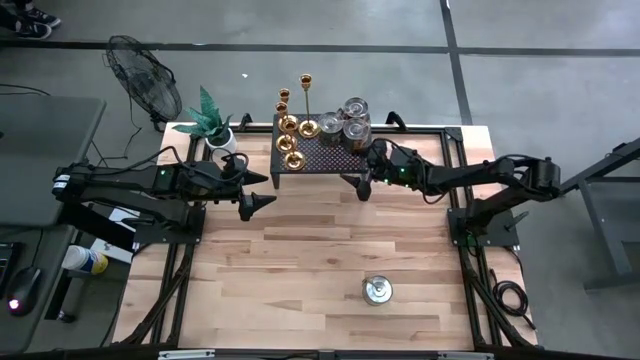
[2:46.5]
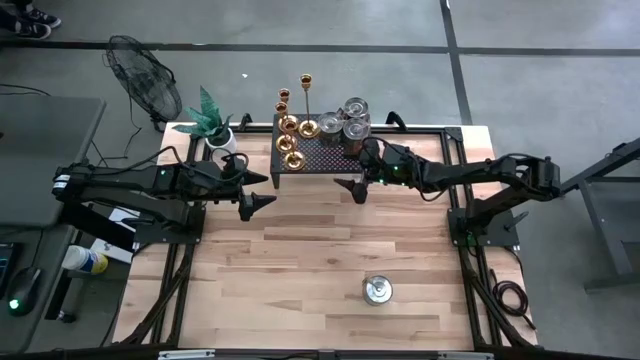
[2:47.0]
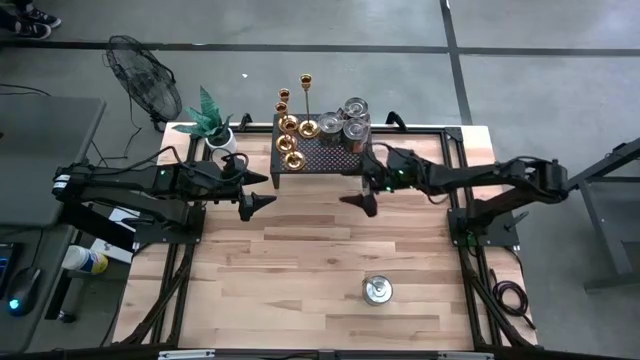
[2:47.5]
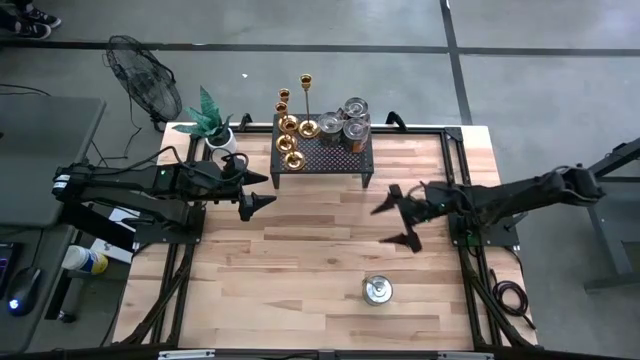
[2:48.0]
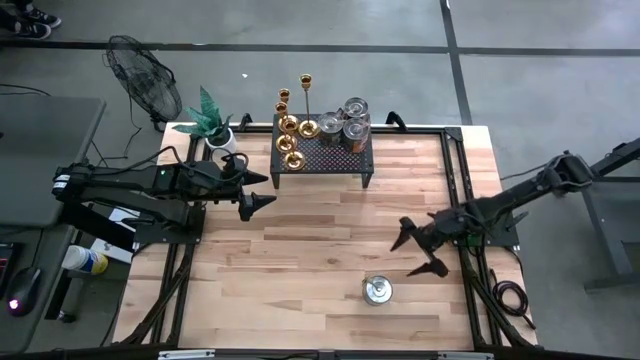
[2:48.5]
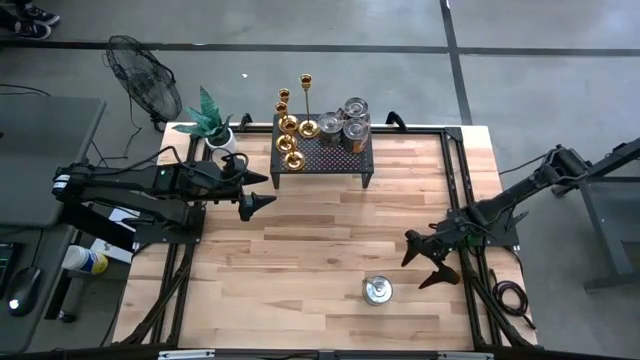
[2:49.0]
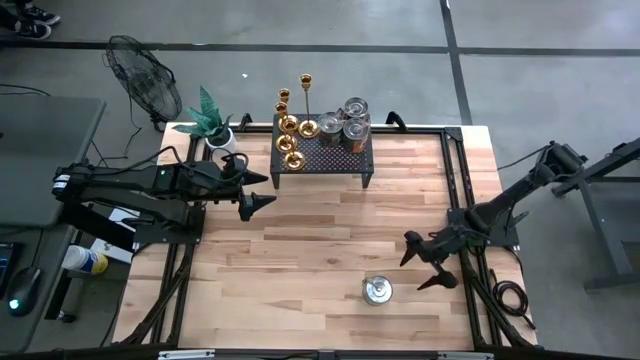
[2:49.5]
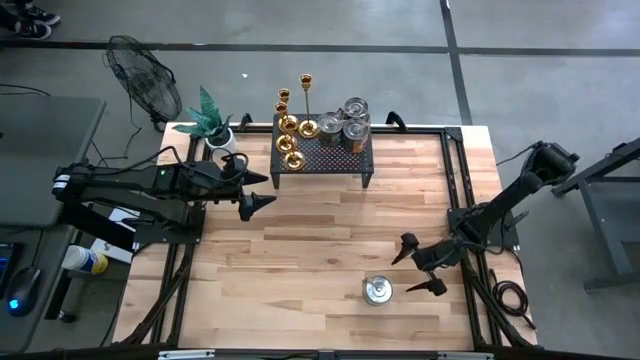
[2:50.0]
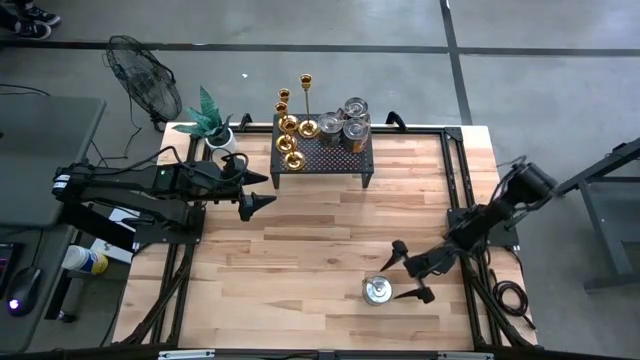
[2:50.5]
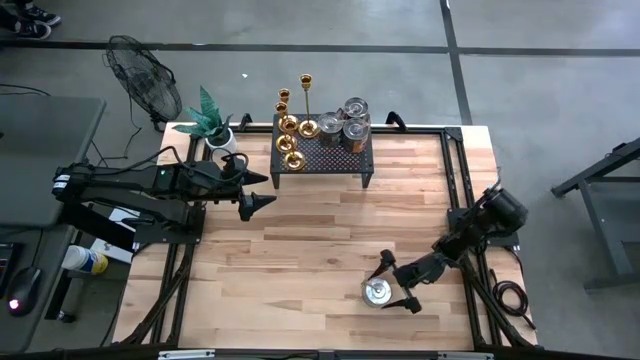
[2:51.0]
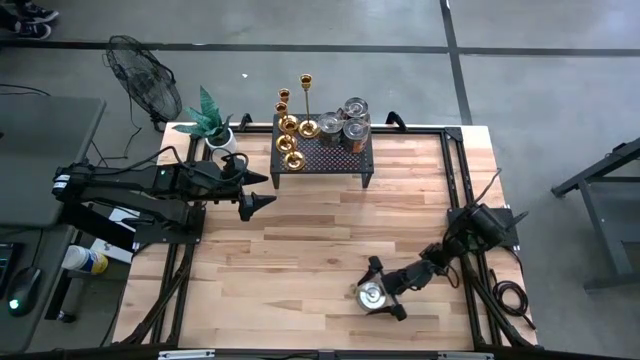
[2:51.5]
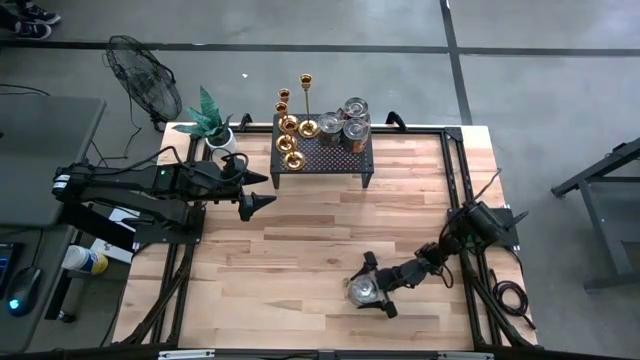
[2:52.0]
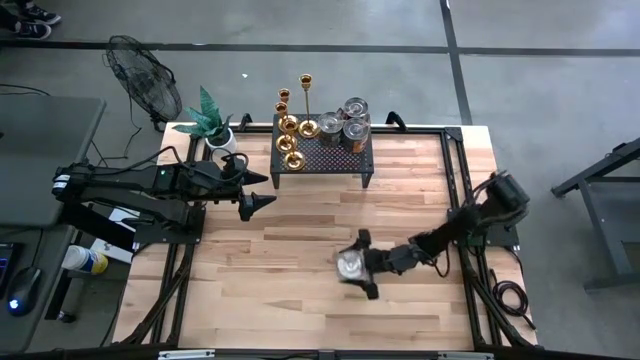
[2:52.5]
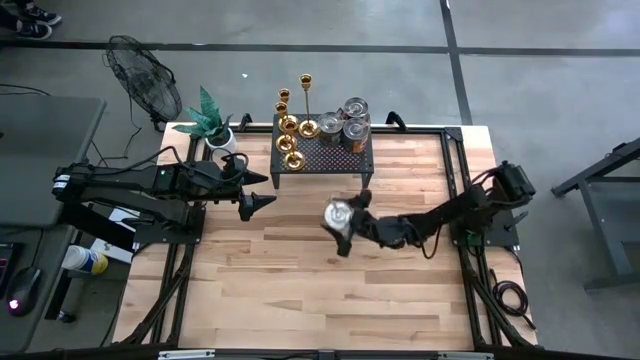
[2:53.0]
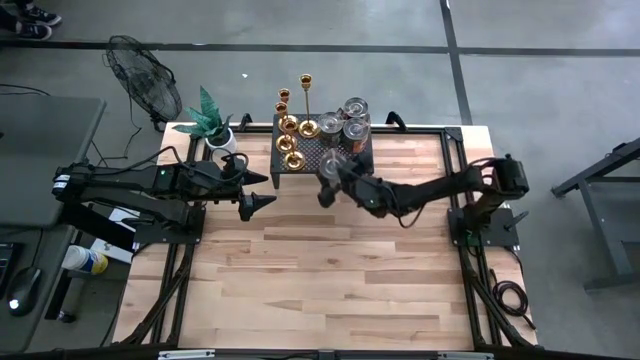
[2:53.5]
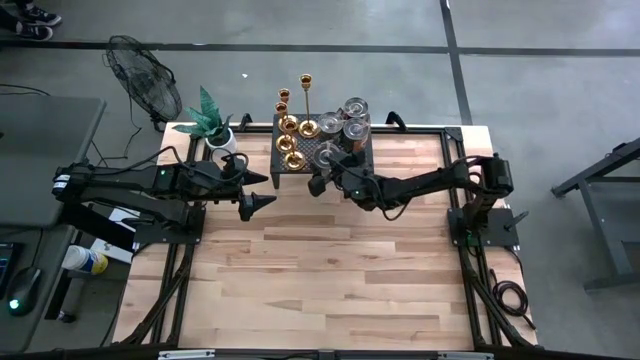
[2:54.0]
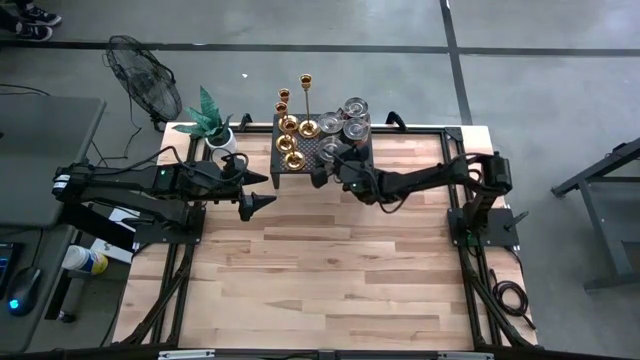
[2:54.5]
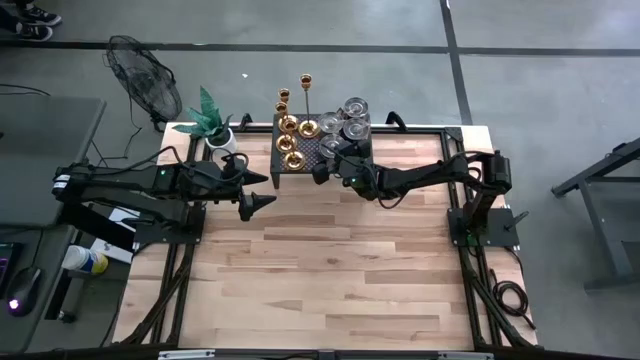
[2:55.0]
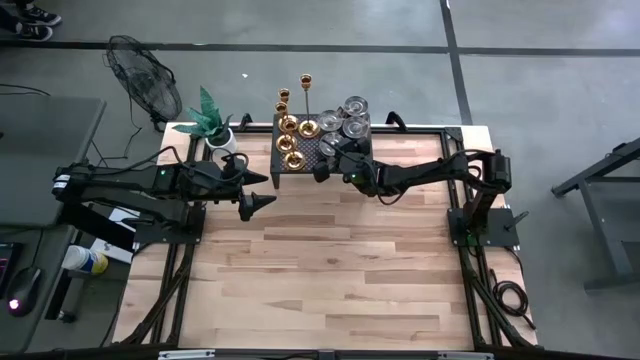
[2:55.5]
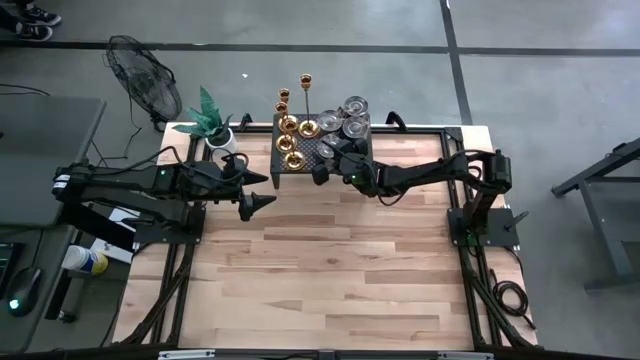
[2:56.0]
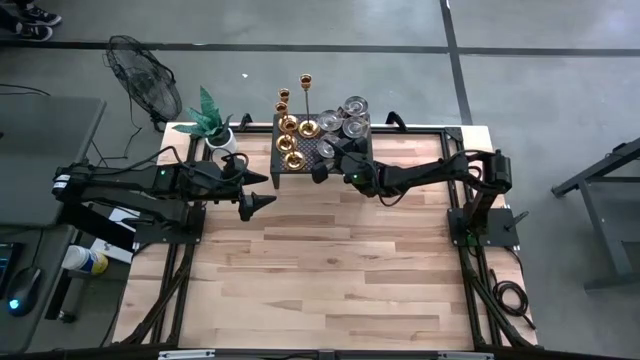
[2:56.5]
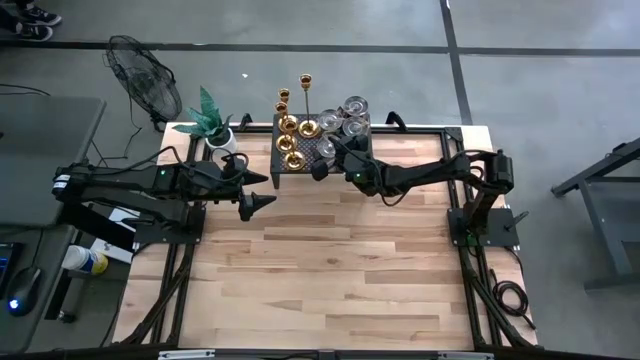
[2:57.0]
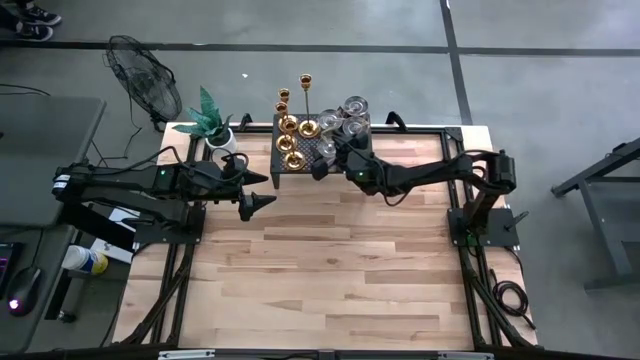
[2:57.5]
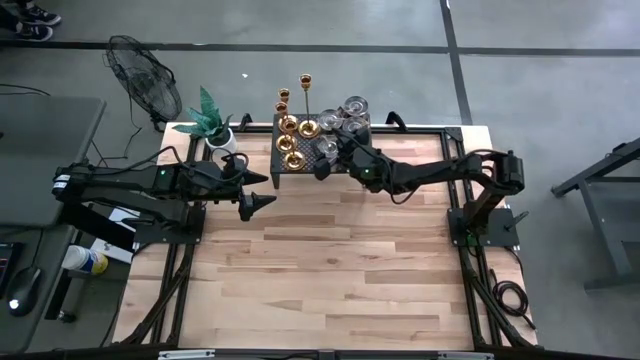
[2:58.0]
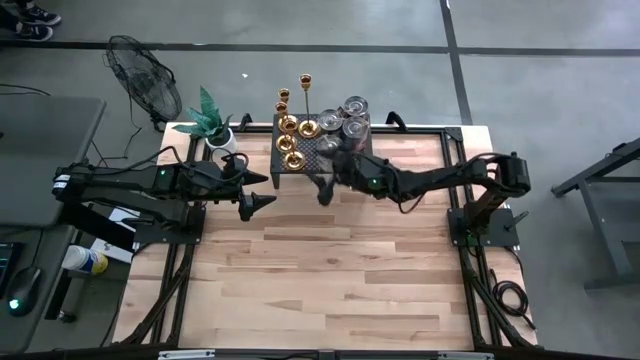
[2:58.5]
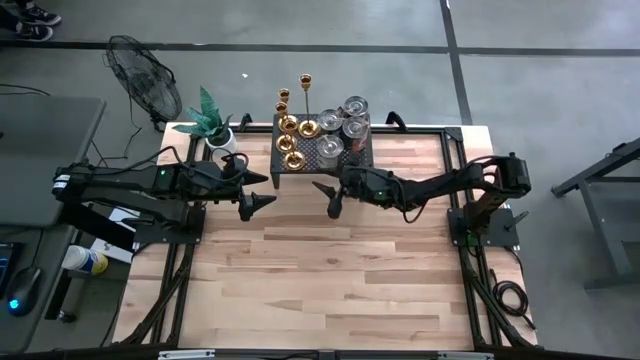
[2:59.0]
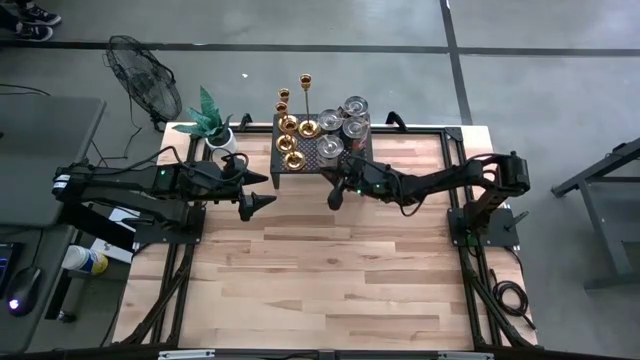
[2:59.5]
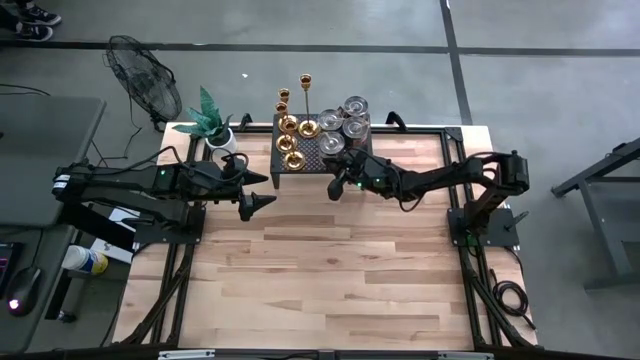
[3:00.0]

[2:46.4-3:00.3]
Task: Pick & Place candle stick holders
Put the green scented candle on the shelf

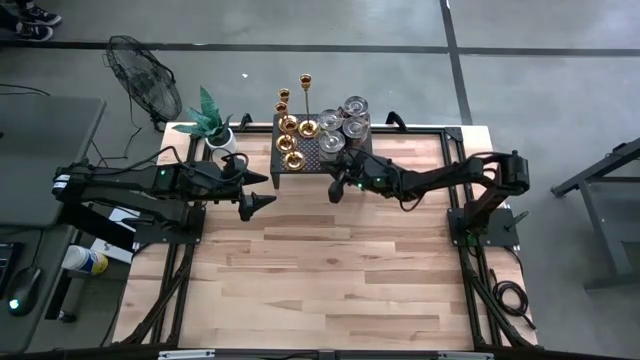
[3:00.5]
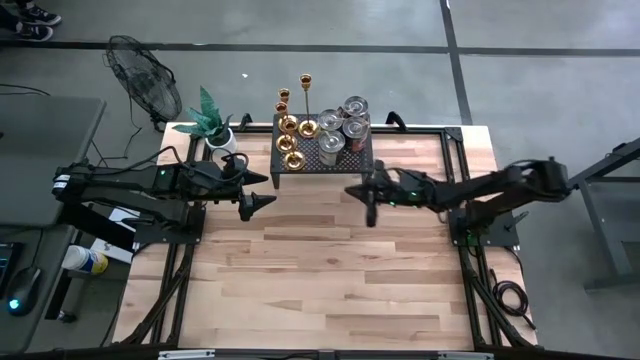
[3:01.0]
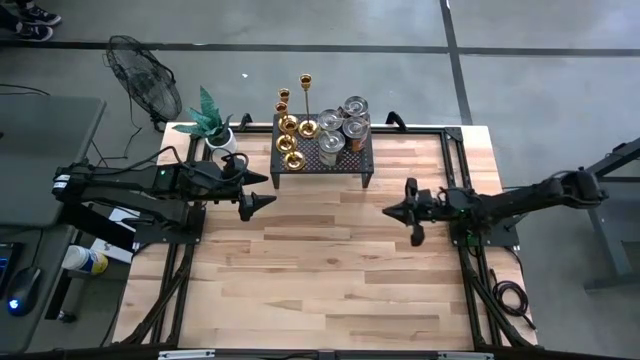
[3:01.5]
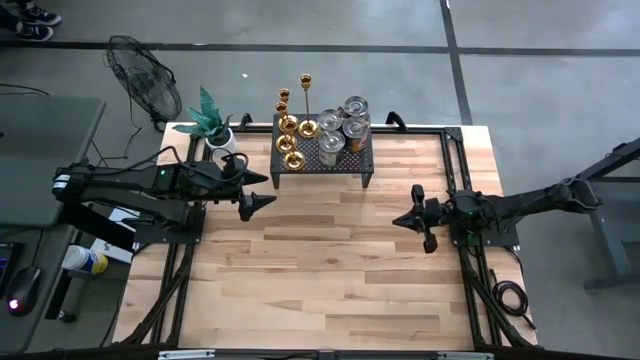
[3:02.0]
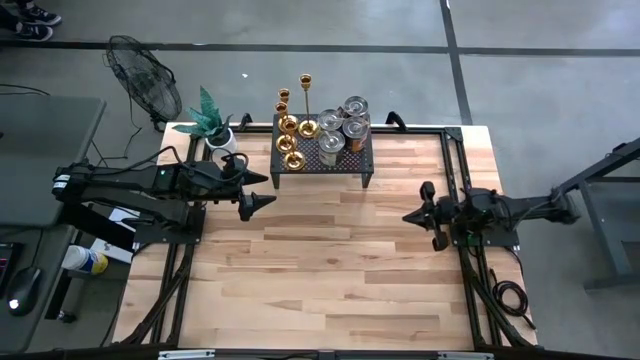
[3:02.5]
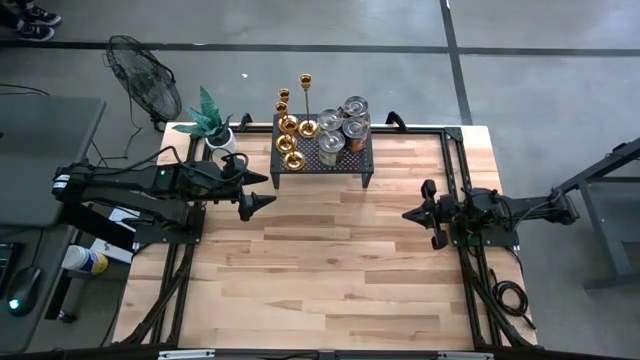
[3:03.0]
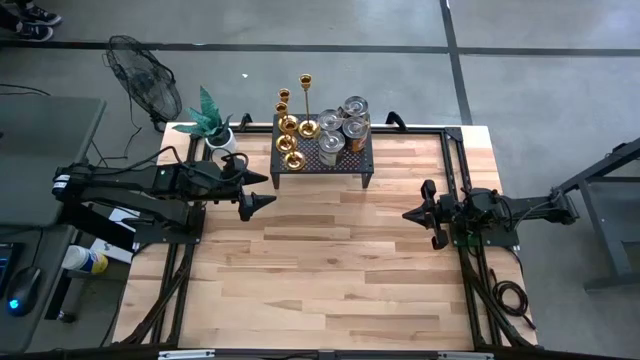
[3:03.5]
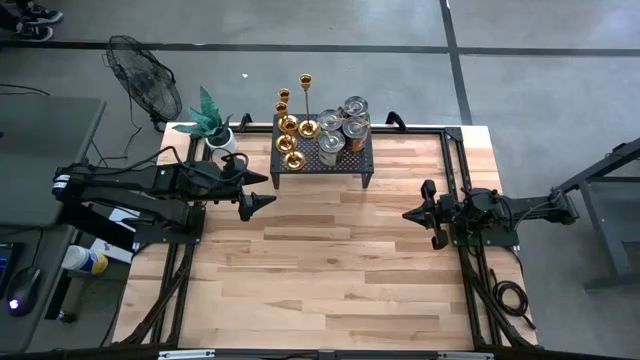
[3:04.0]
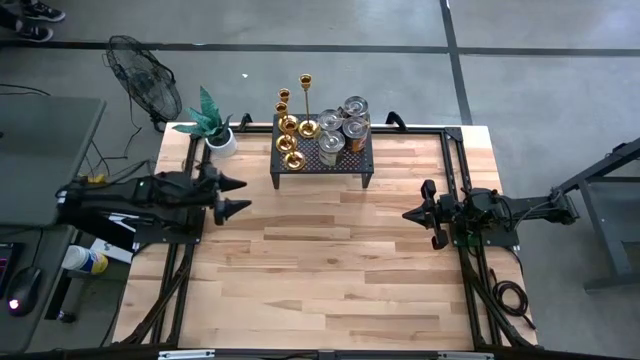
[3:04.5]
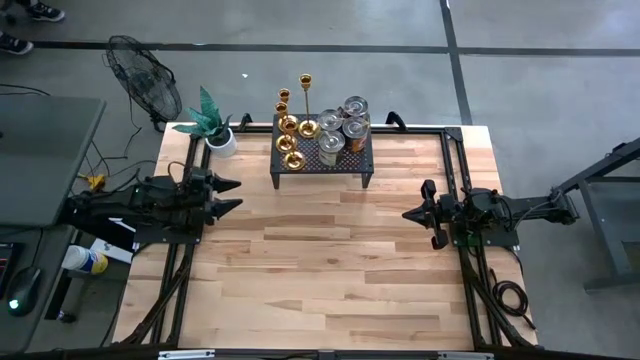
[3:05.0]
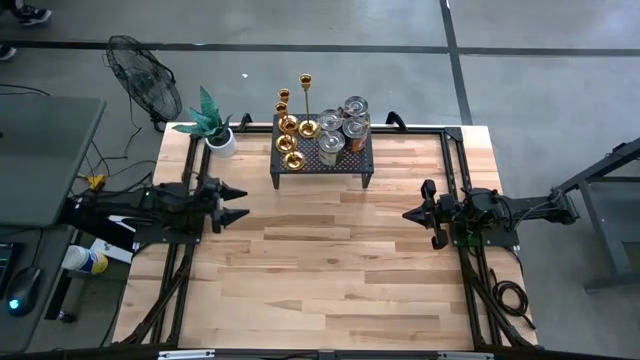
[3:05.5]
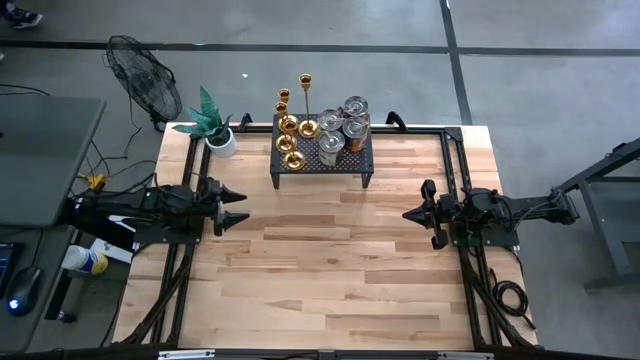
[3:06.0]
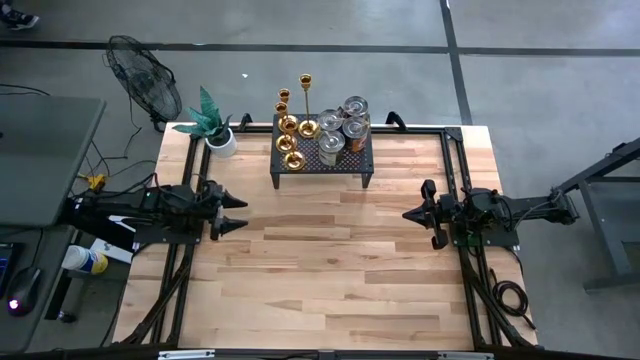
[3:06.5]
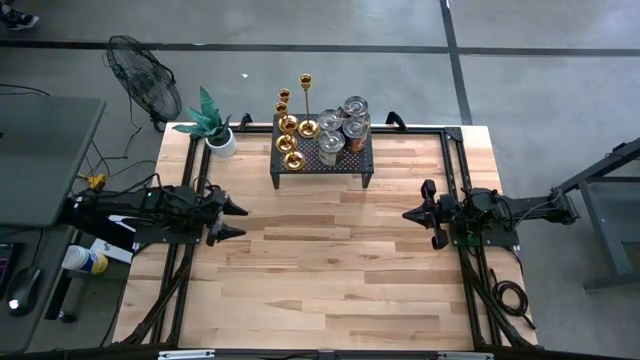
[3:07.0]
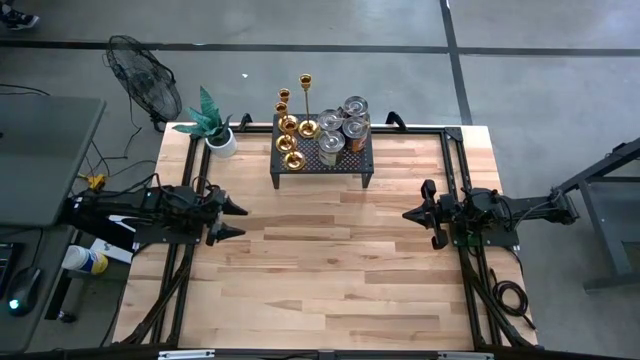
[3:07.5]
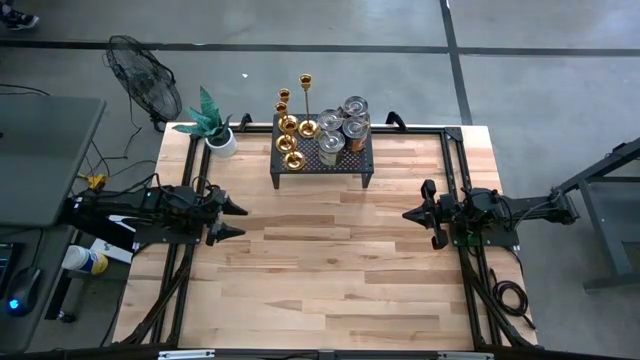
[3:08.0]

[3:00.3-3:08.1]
Return to Home Position

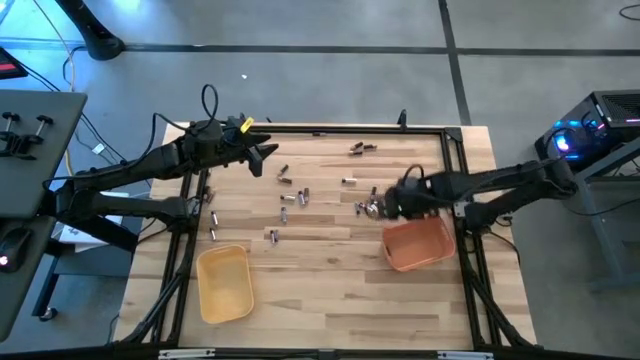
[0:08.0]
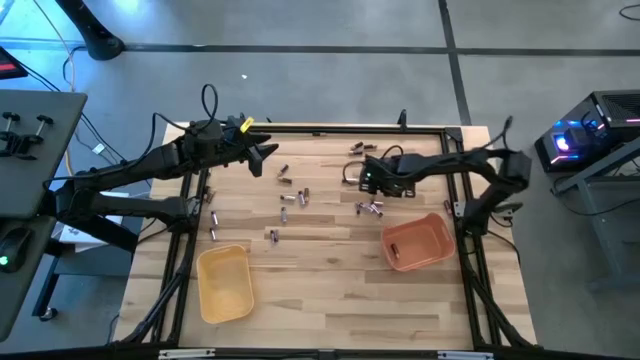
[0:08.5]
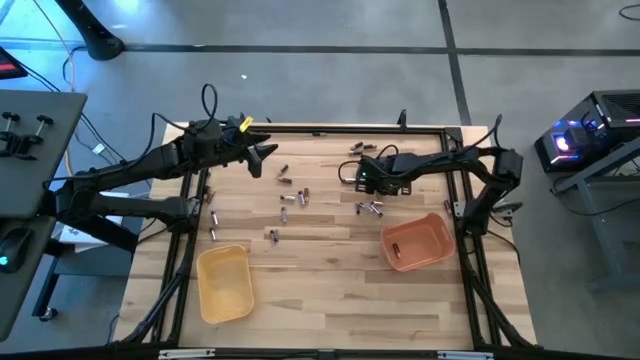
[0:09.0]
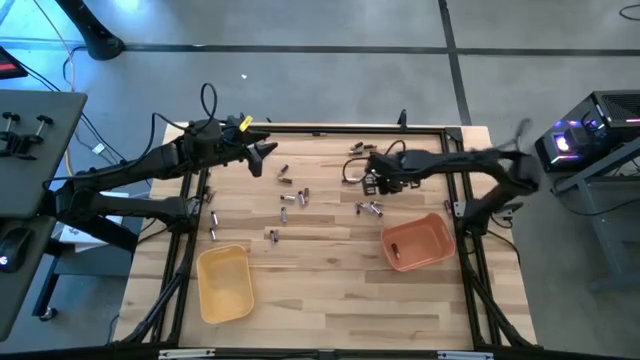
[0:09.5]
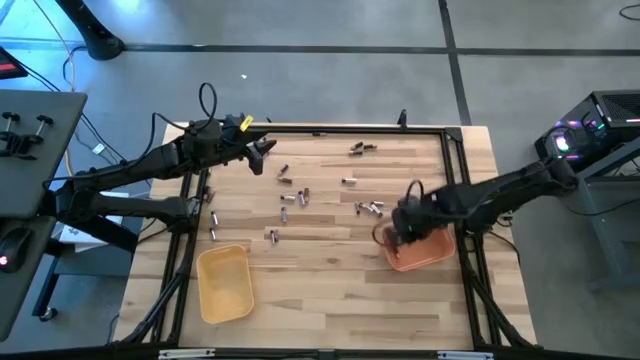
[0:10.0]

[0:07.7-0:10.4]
Task: Sort batteries
Put the black battery into the orange bin
